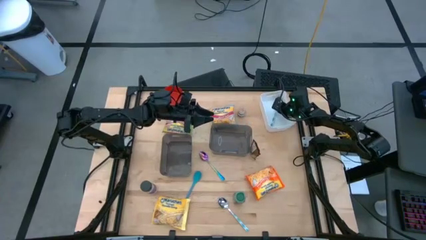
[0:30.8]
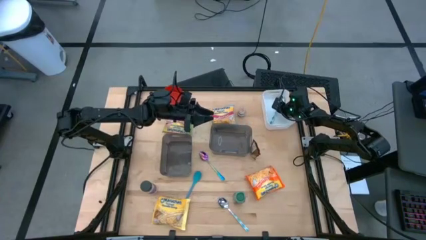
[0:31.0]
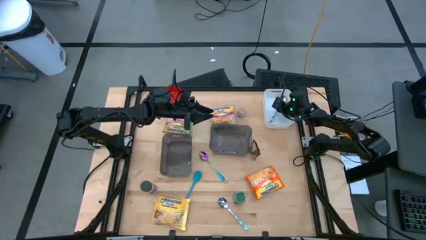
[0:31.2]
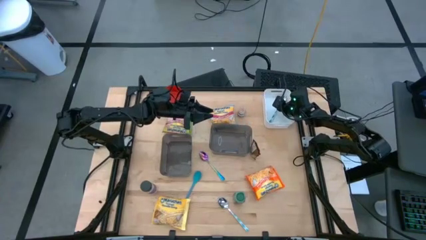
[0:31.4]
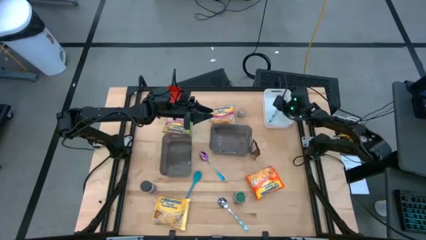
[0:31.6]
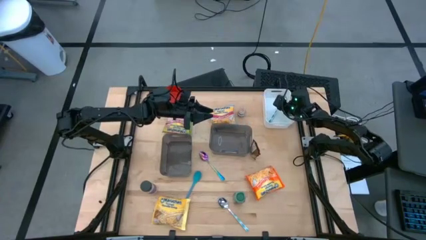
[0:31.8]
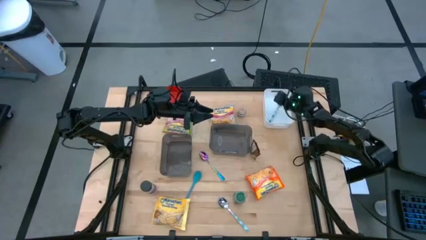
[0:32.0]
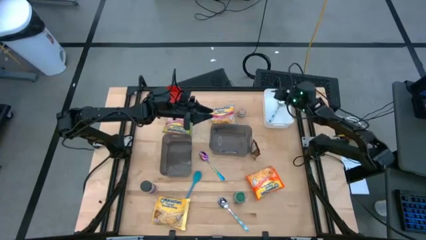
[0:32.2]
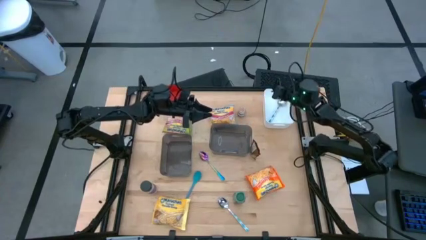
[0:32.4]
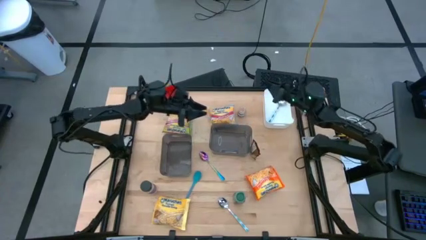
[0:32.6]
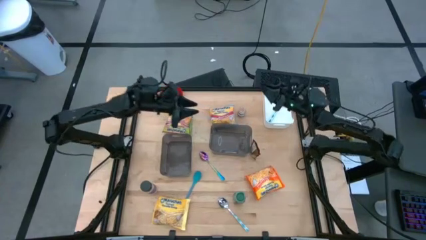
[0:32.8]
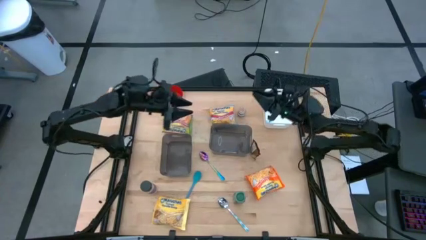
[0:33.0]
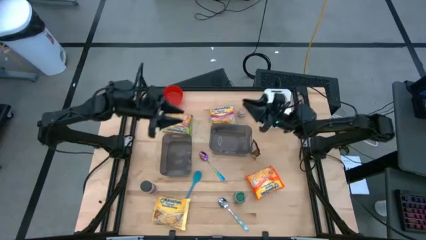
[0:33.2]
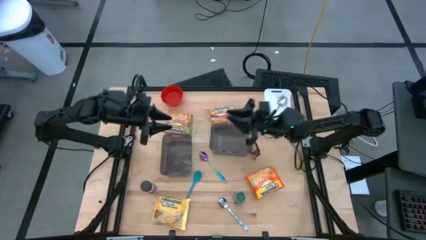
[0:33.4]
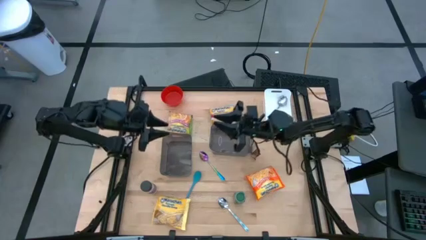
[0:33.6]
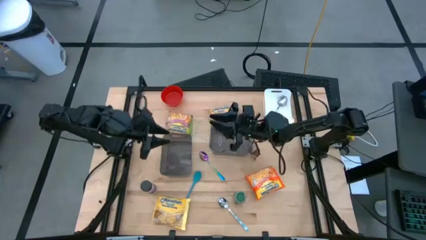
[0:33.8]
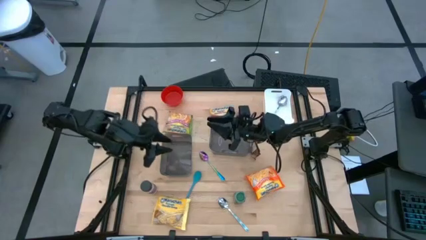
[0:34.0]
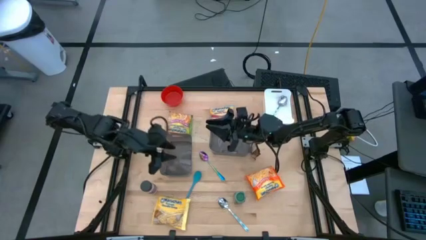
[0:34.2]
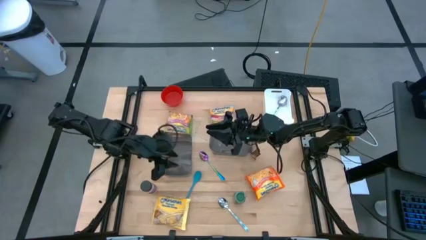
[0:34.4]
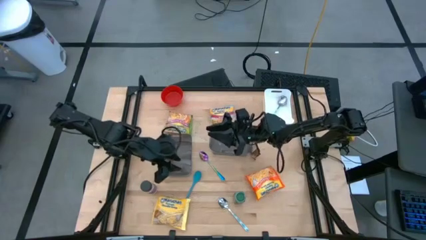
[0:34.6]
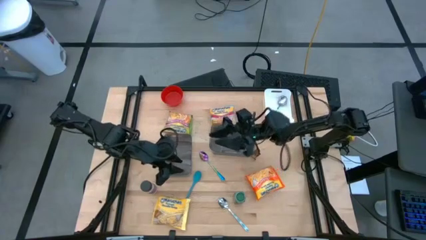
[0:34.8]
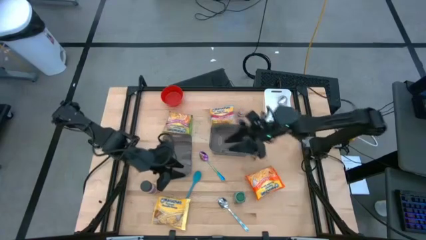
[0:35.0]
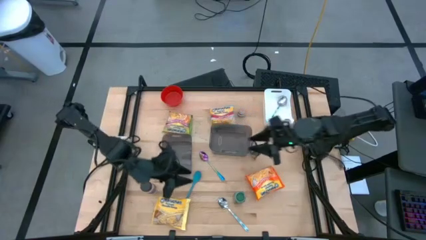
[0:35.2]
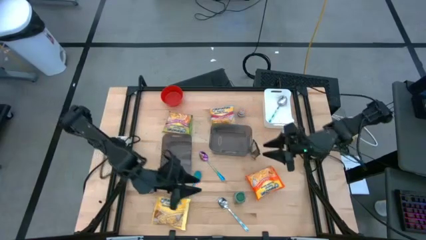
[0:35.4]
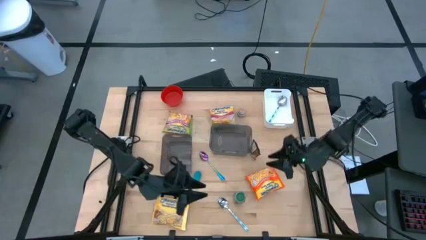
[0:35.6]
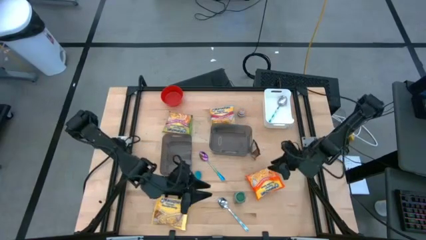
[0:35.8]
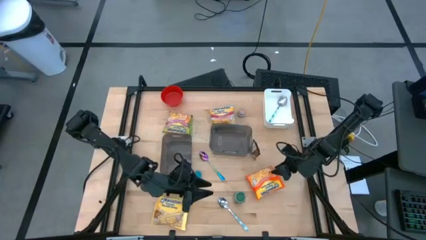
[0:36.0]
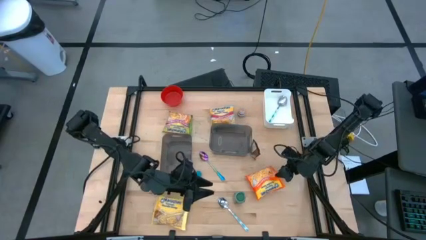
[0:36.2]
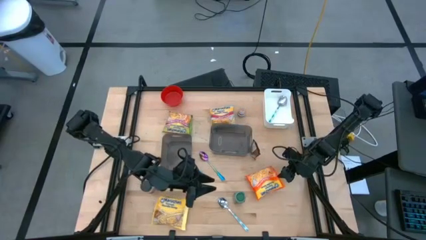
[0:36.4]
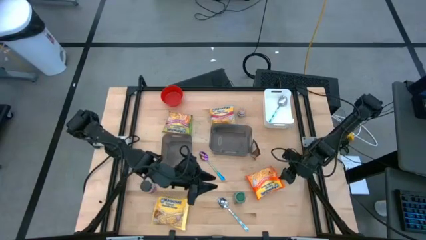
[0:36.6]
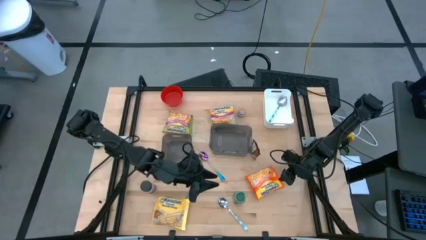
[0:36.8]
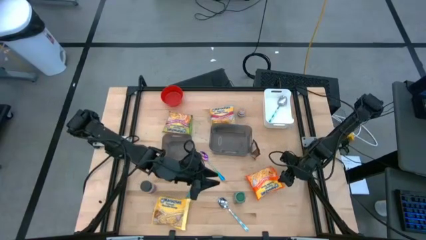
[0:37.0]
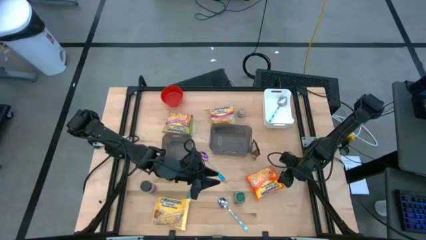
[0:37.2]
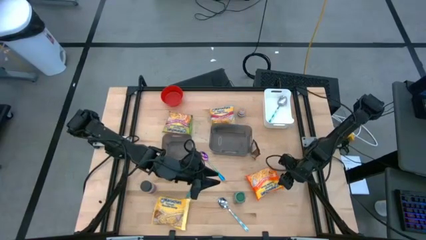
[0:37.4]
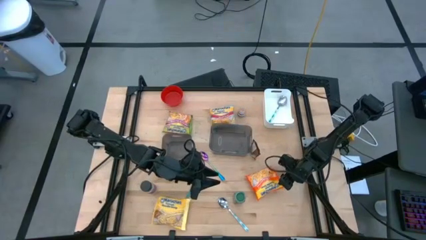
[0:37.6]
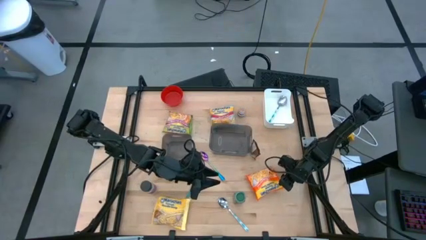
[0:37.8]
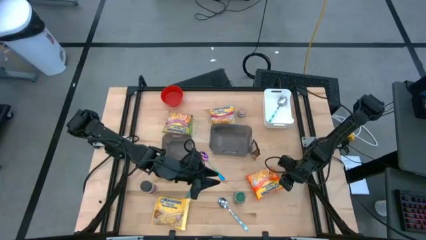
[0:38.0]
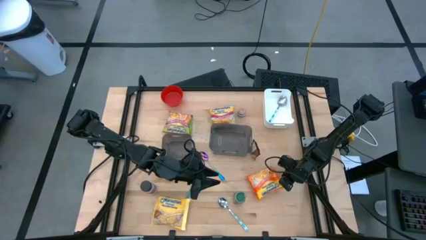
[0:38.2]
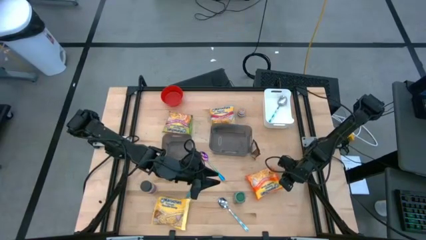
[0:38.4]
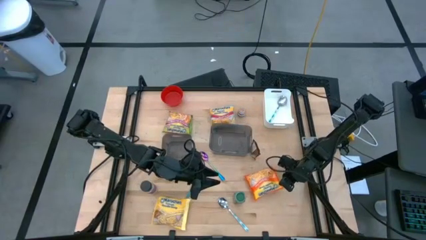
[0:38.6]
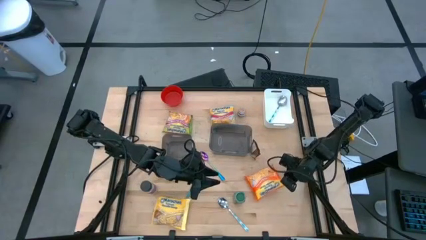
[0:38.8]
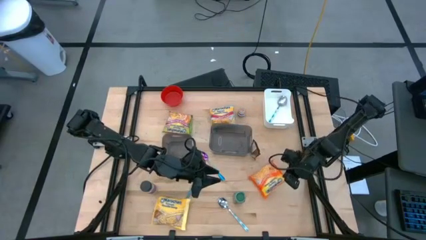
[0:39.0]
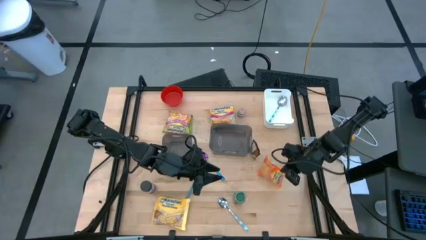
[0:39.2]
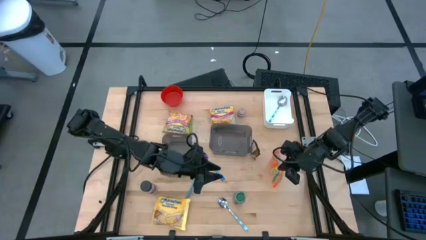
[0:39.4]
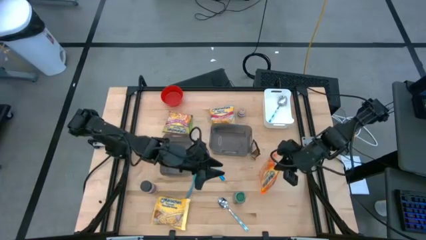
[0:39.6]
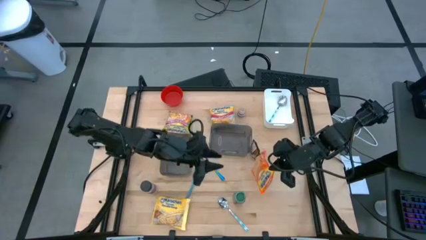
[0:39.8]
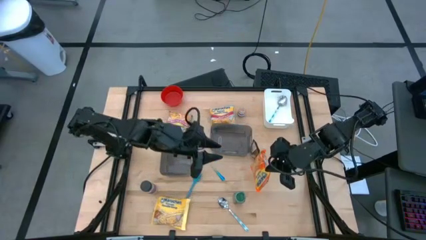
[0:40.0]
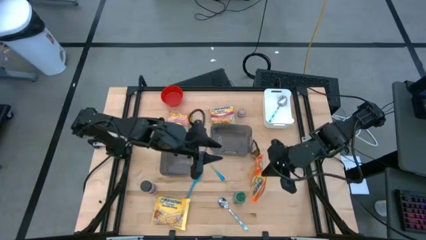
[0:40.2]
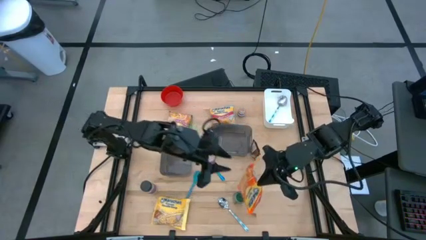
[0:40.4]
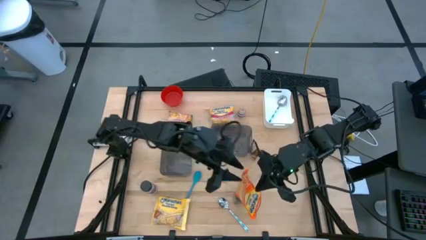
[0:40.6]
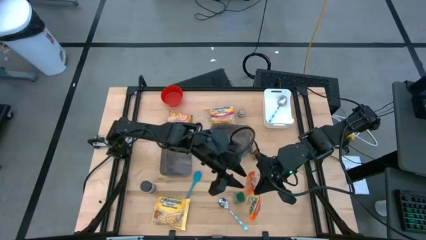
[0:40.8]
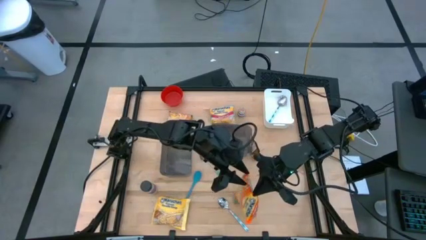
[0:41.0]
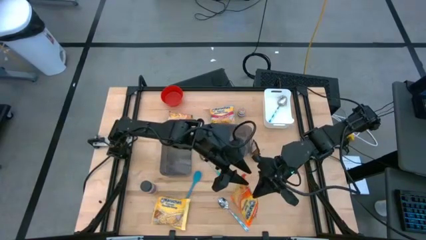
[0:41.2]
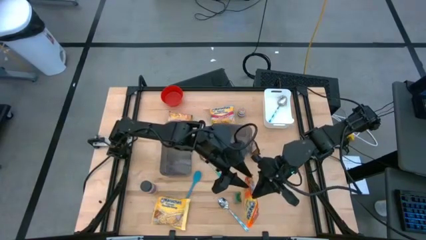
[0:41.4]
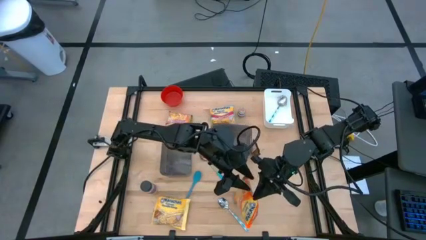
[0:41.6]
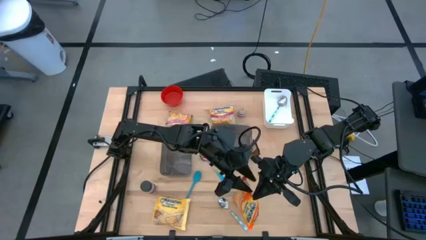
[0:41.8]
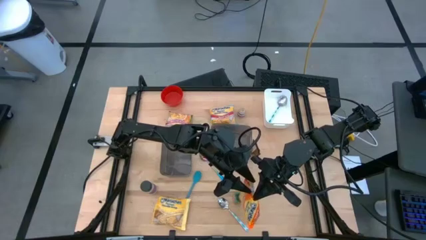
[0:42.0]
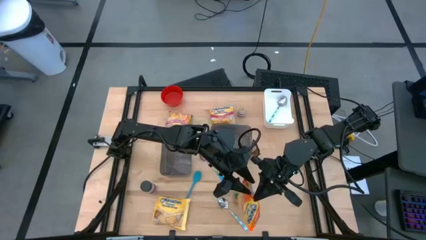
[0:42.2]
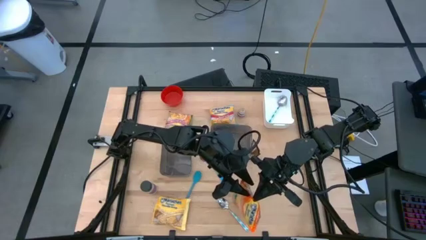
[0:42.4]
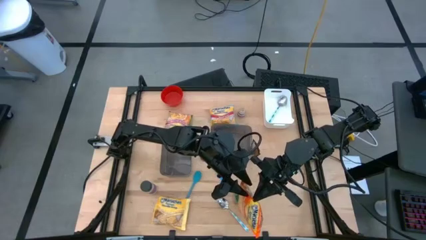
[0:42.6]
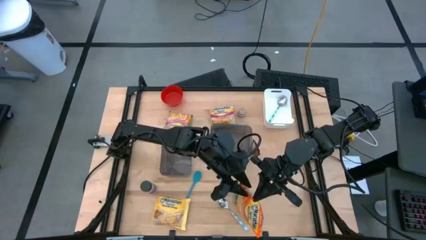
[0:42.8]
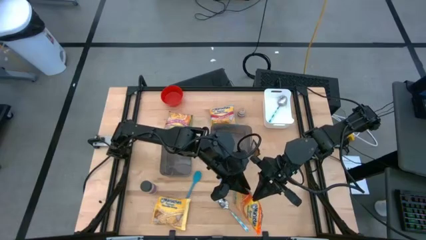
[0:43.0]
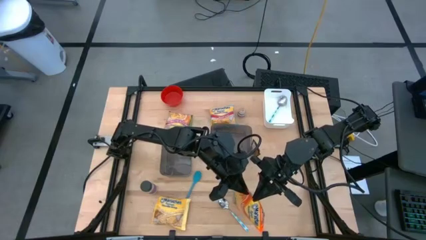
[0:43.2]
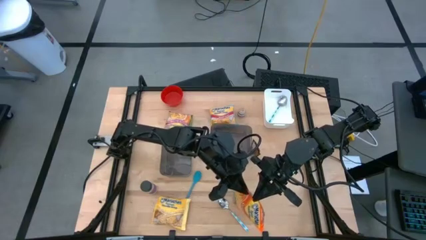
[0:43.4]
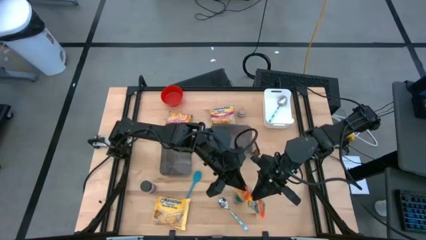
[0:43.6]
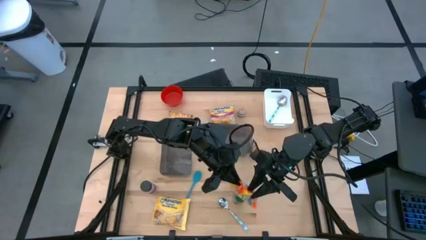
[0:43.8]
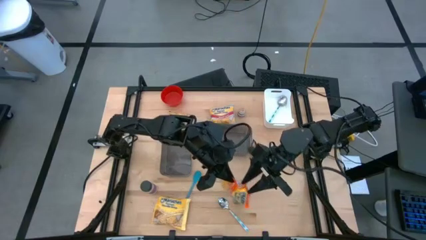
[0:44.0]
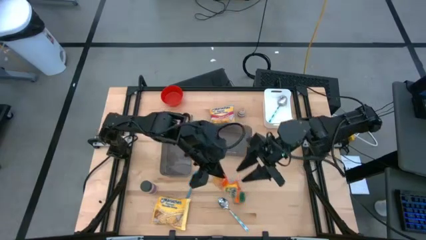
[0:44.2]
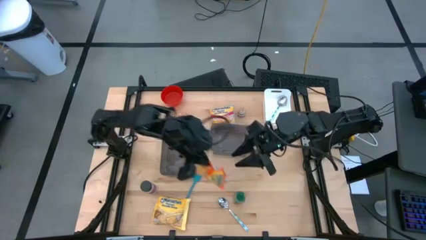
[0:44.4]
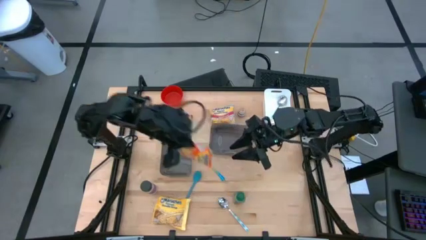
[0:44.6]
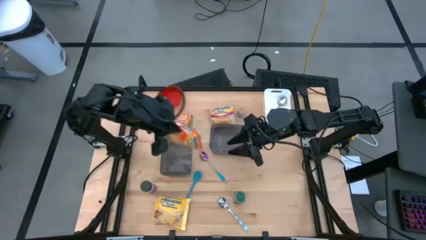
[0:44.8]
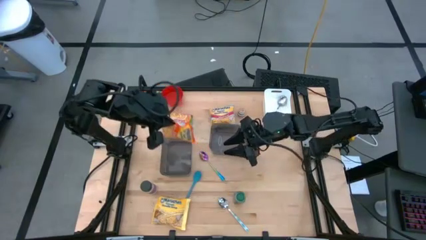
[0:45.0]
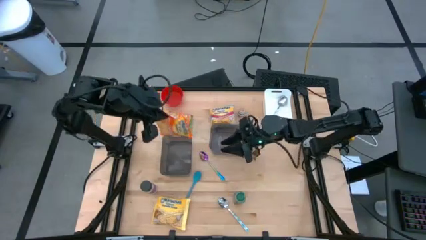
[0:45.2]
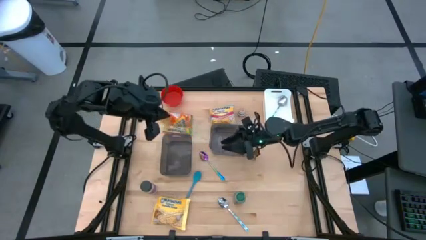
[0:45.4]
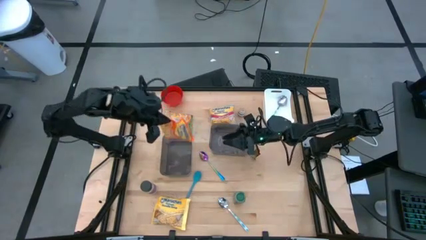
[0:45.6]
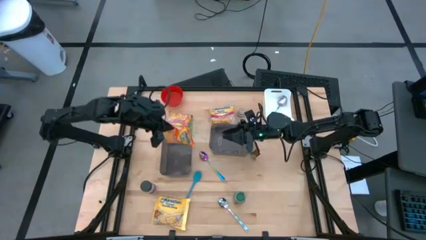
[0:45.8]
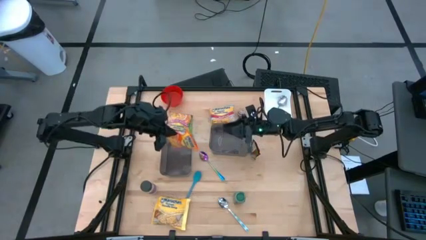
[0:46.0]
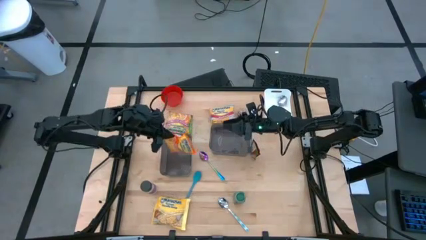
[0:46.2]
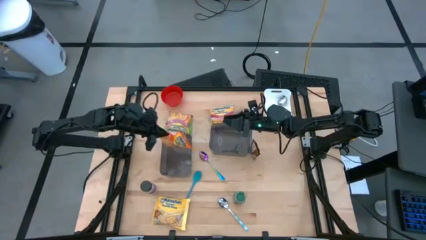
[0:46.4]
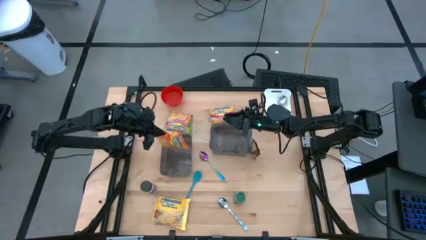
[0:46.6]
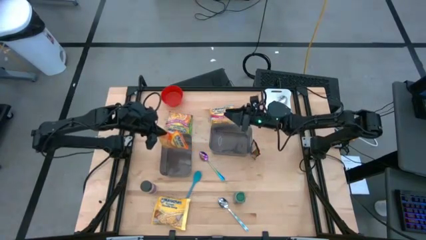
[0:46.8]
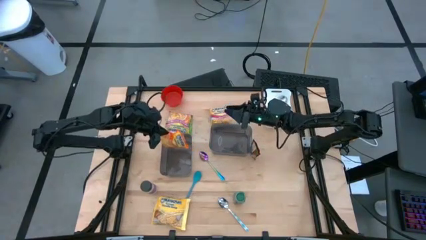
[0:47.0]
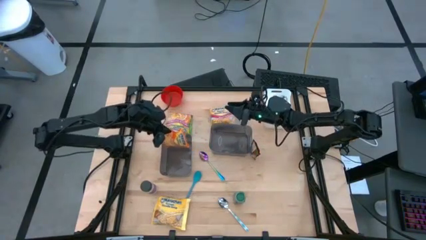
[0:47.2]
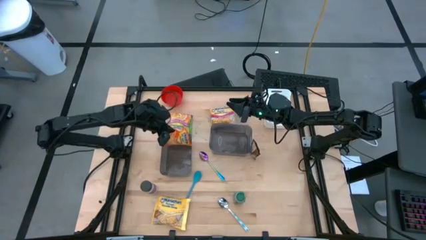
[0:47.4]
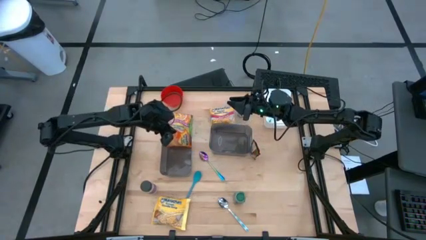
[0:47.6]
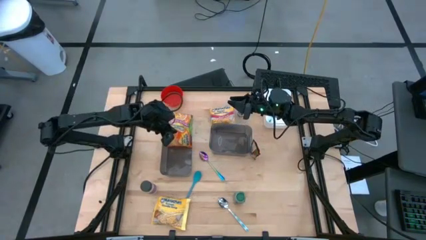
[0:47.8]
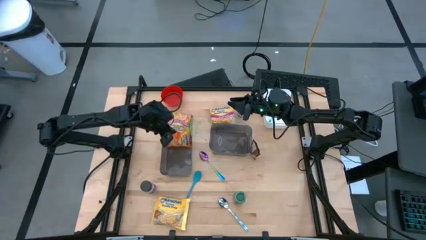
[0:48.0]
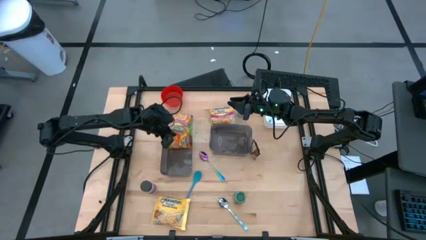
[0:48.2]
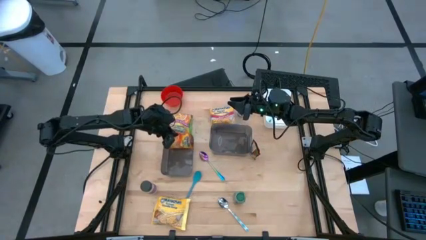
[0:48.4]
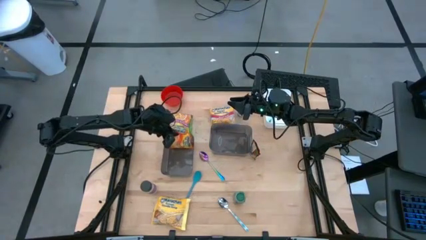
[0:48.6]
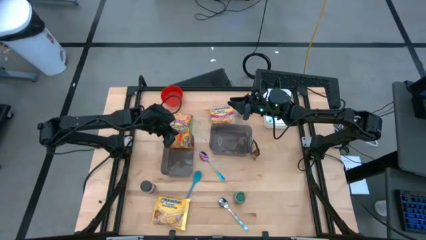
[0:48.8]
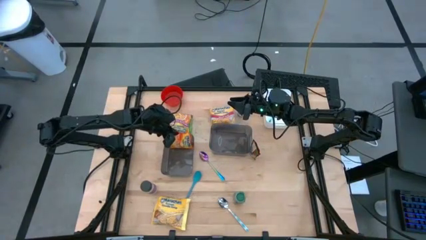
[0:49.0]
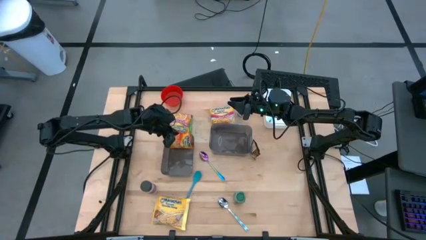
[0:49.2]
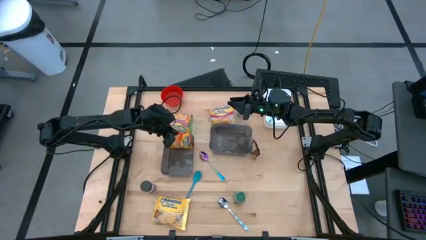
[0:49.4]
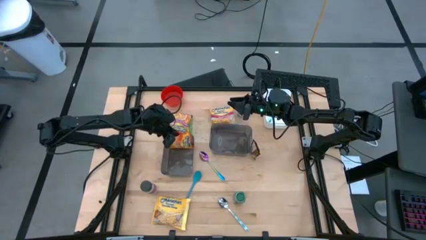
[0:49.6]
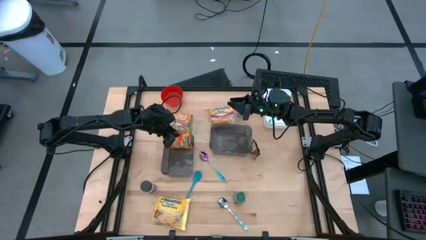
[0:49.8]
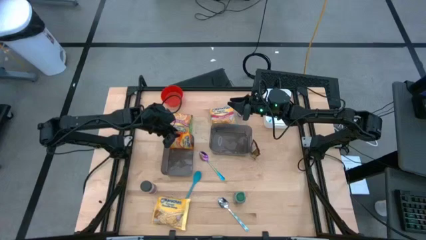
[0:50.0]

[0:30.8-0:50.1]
Task: Pick & Place Food Item
Put the orange noodle pack into the left black bin
